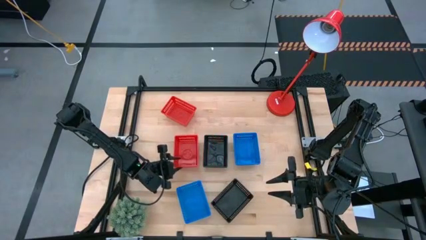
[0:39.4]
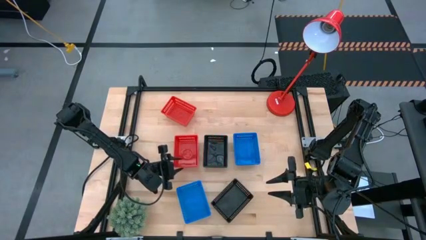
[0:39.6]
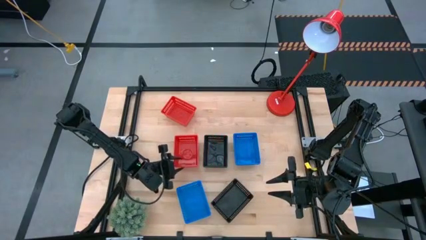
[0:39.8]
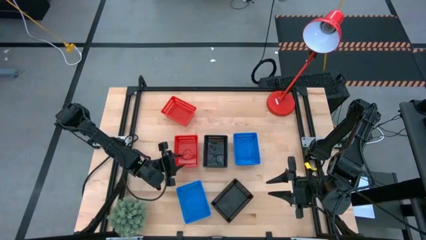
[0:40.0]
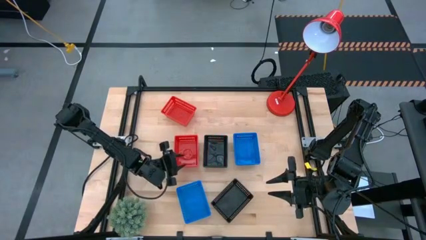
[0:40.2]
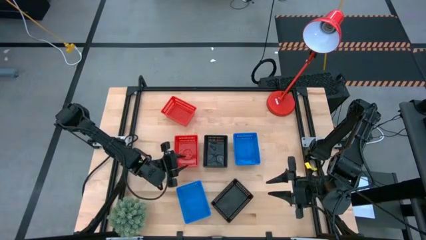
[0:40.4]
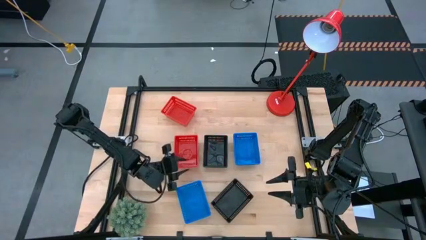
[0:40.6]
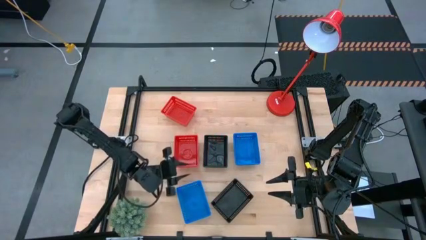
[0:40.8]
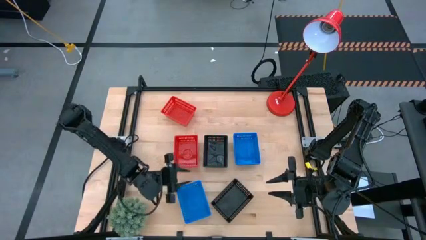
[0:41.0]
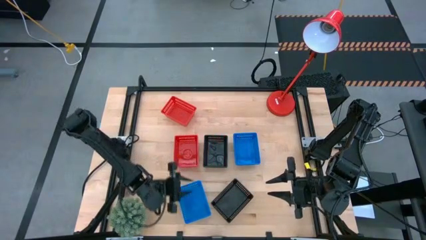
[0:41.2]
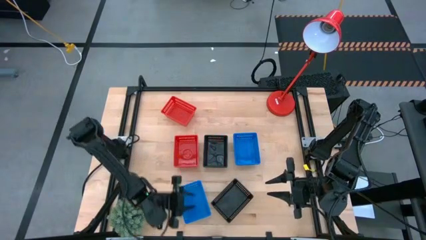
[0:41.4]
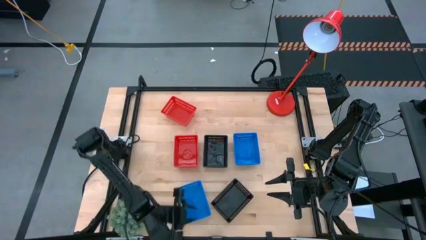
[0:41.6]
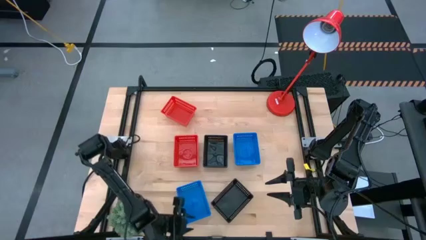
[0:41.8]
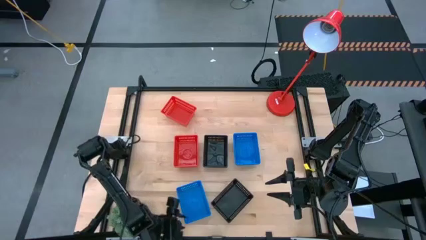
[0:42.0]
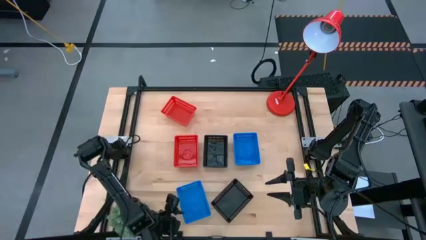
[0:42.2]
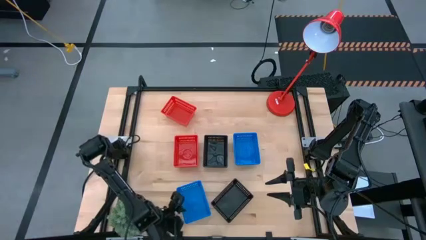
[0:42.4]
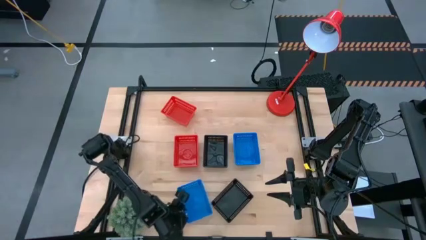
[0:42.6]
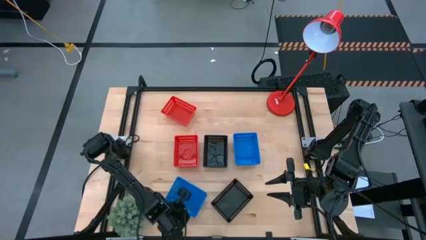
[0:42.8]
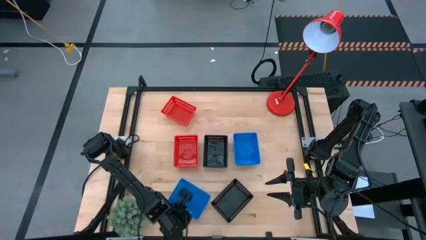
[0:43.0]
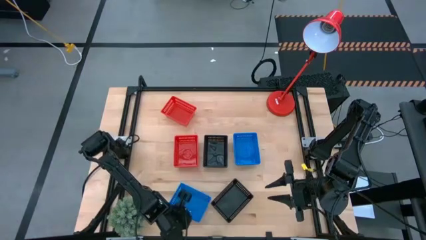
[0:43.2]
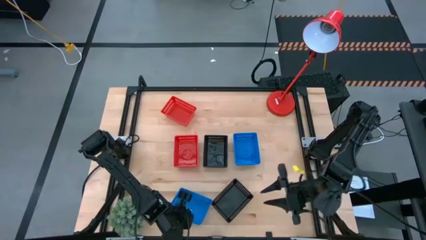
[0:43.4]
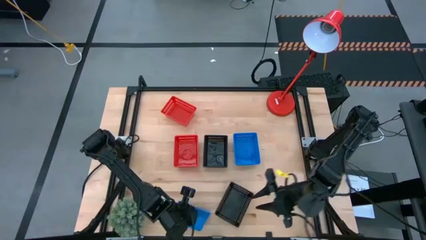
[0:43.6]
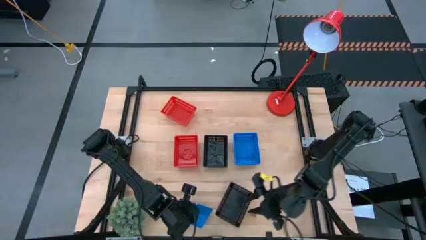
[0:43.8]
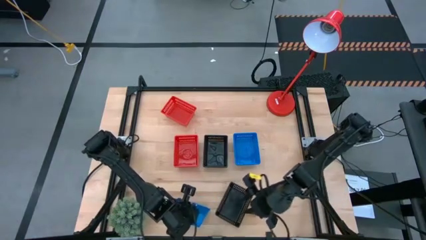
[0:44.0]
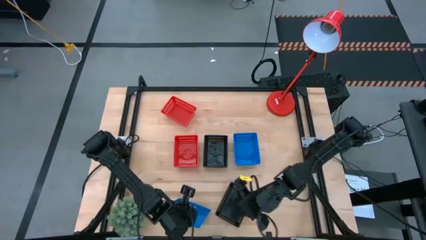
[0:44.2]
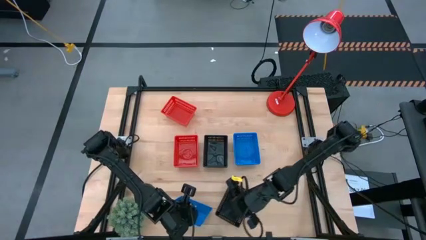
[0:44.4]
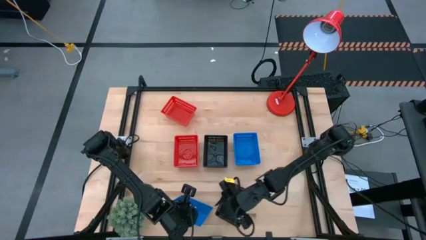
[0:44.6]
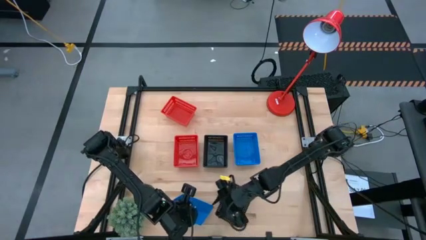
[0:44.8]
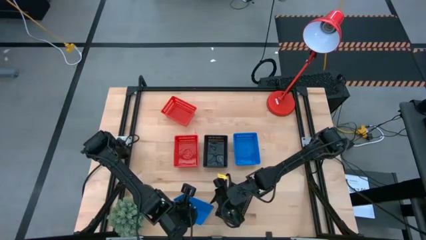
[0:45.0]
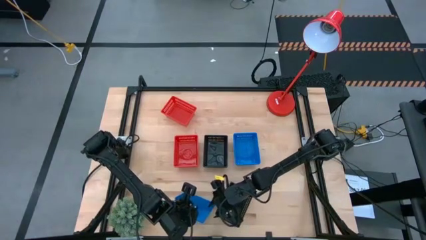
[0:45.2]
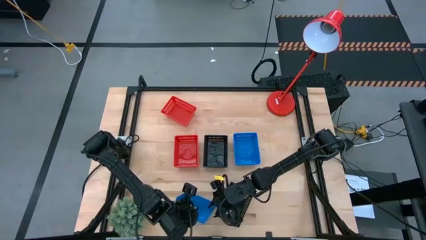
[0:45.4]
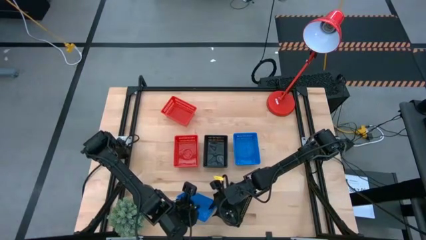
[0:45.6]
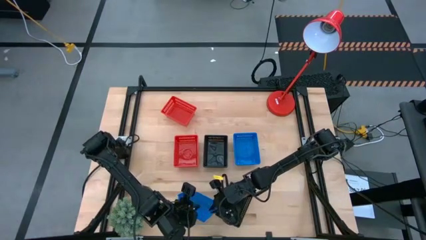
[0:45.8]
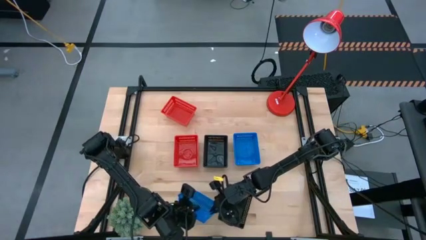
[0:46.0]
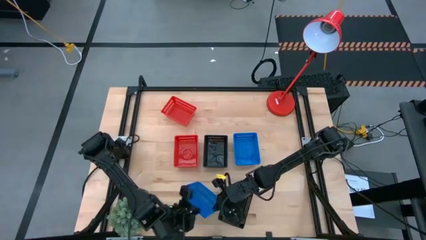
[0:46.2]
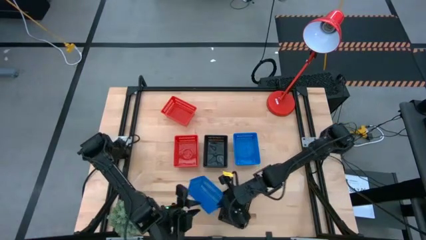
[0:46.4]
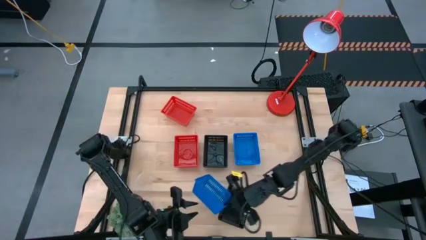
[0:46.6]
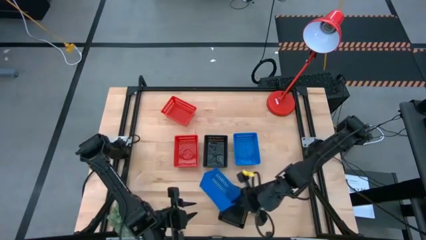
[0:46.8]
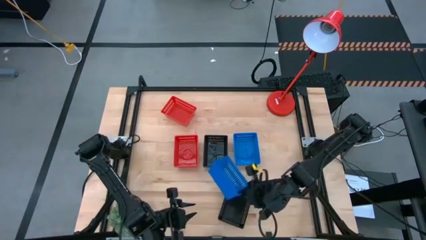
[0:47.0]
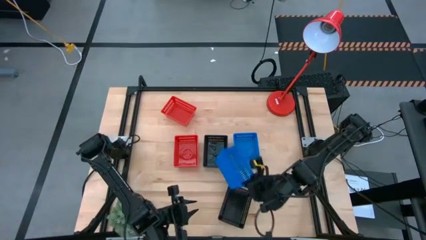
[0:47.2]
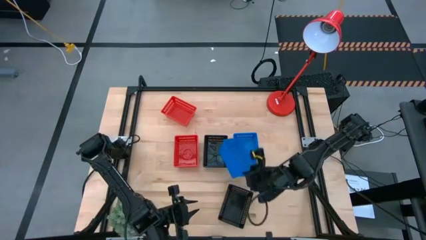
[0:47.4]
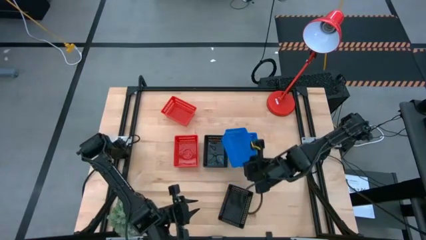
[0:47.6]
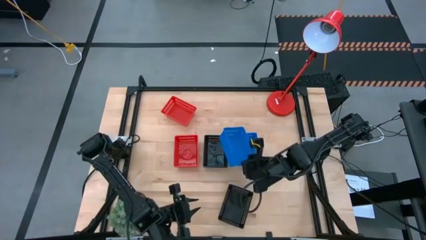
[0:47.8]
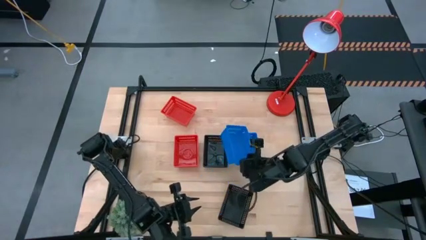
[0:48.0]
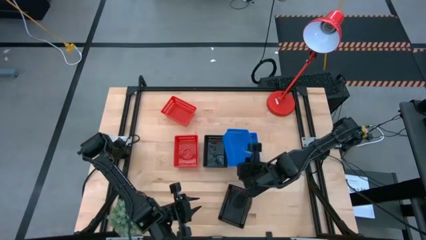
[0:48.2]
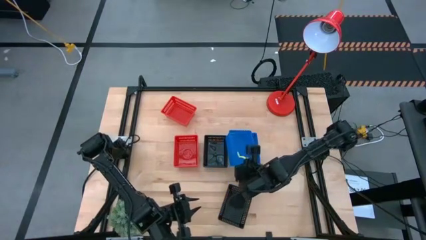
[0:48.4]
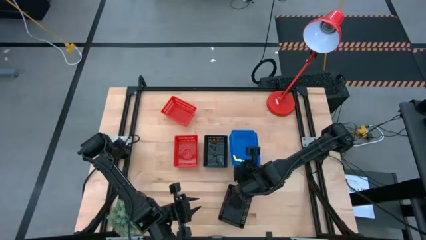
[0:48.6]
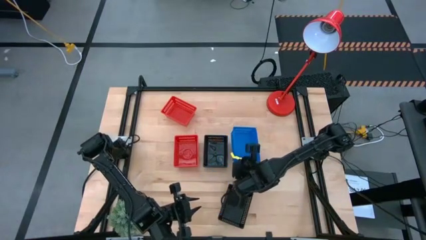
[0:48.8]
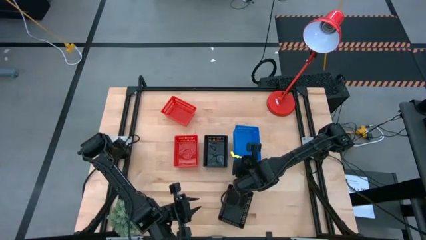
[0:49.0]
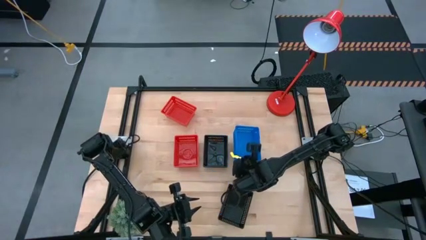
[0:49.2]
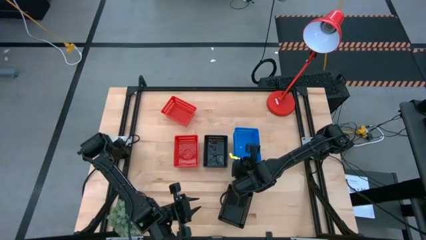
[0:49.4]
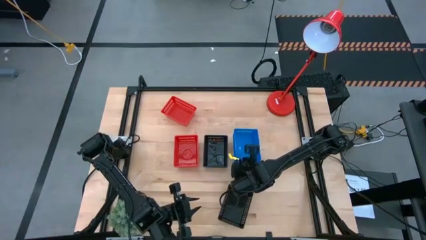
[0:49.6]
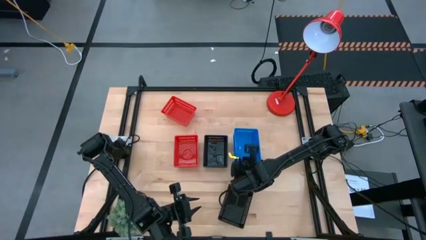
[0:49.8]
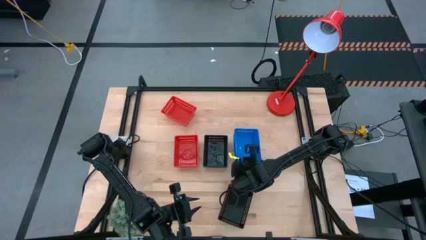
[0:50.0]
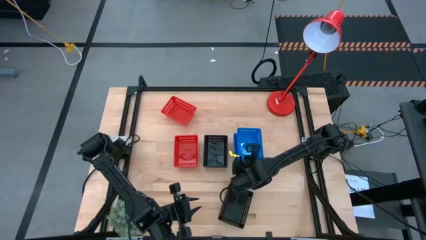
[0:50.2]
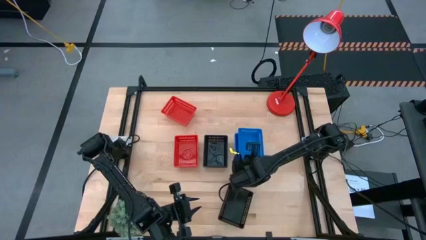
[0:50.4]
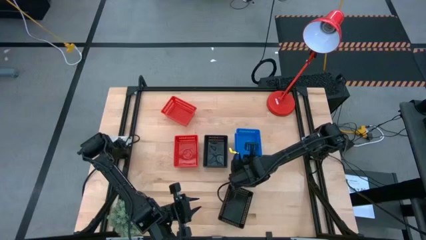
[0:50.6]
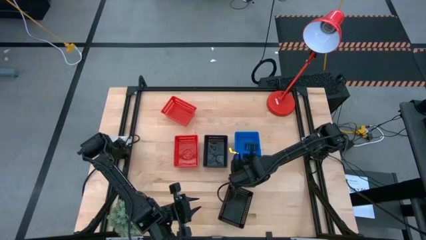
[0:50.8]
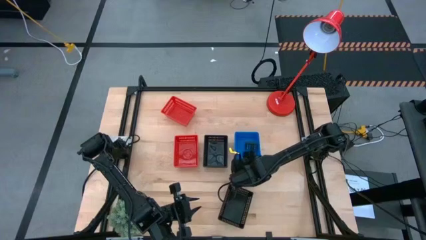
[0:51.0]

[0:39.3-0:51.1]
Stack the bottom blue bin on the top stacked blue bins

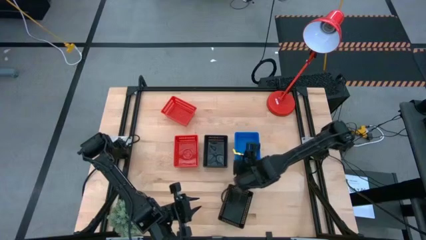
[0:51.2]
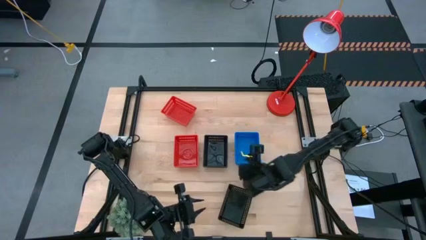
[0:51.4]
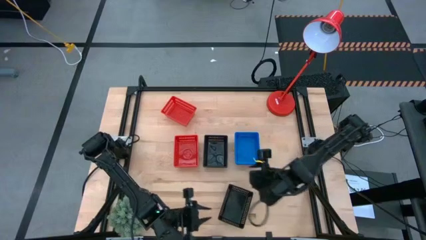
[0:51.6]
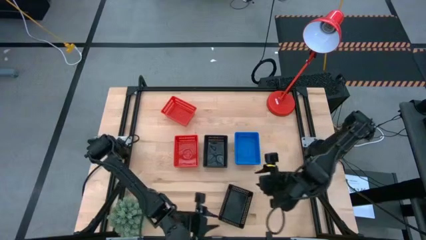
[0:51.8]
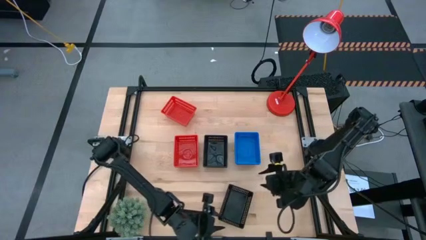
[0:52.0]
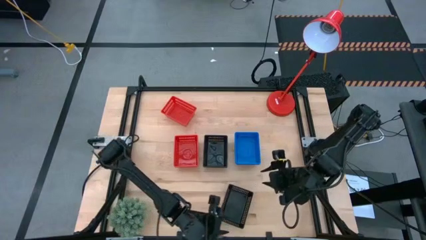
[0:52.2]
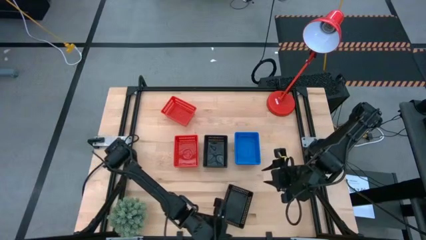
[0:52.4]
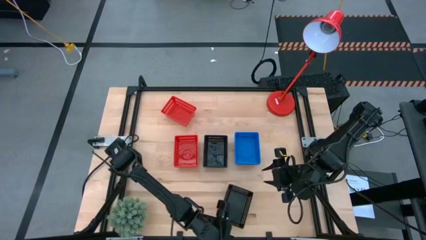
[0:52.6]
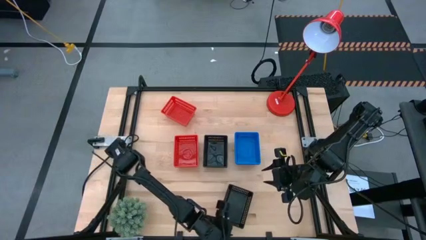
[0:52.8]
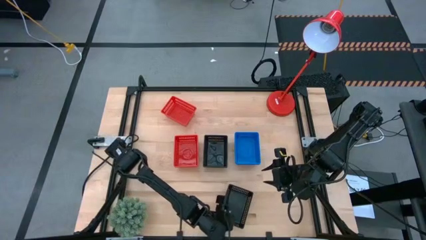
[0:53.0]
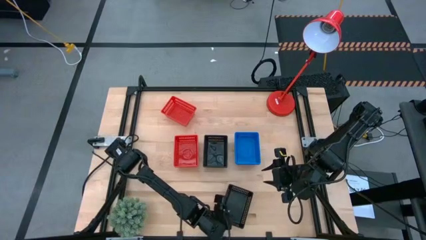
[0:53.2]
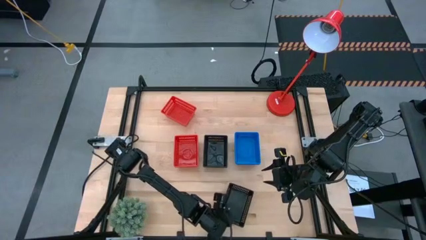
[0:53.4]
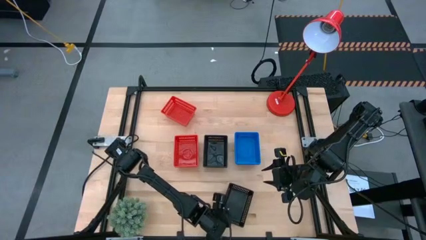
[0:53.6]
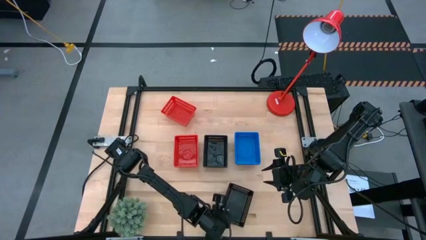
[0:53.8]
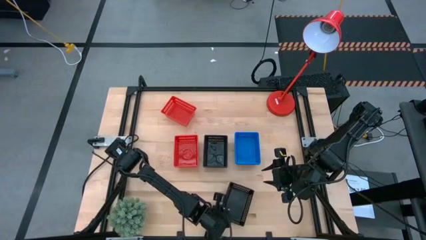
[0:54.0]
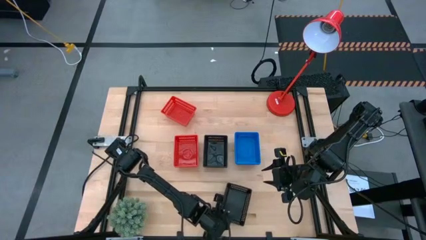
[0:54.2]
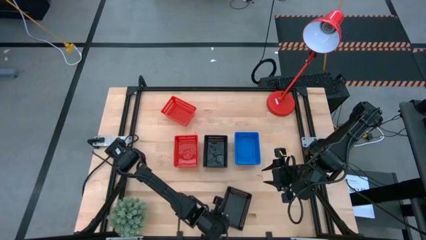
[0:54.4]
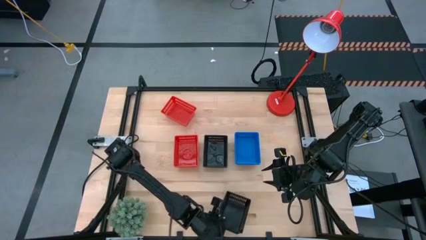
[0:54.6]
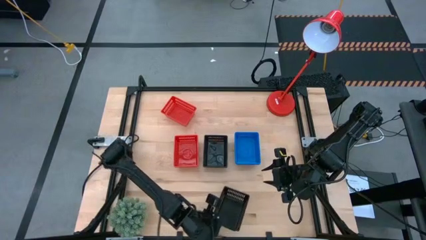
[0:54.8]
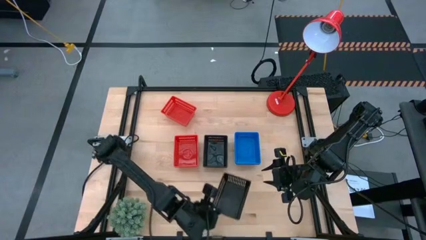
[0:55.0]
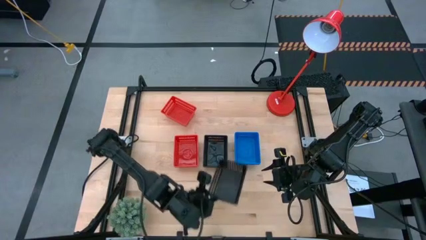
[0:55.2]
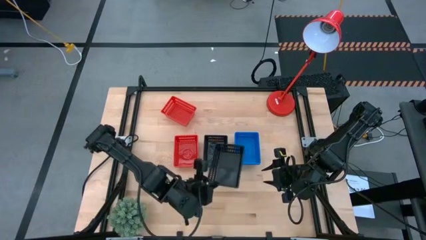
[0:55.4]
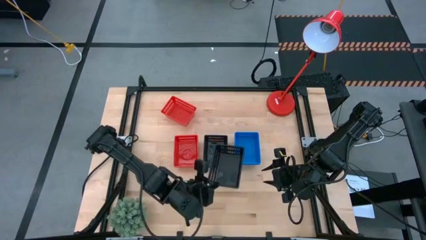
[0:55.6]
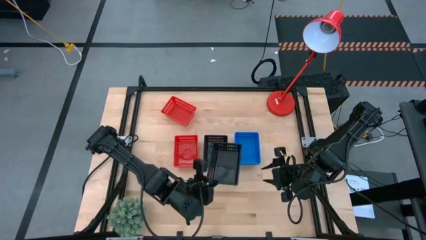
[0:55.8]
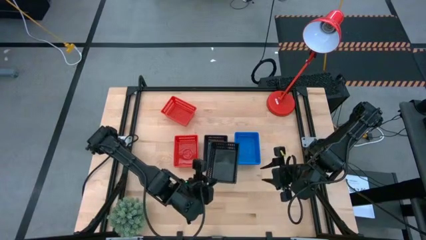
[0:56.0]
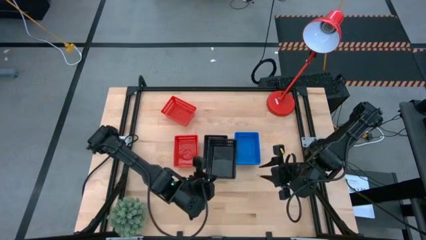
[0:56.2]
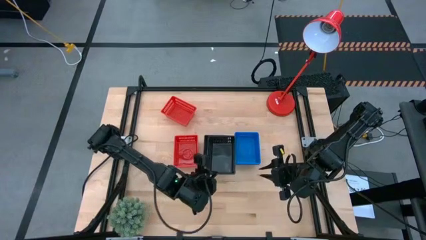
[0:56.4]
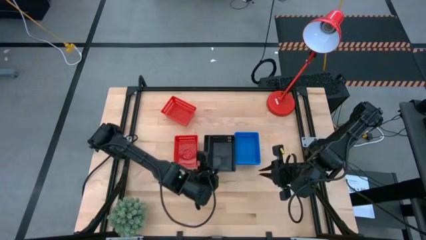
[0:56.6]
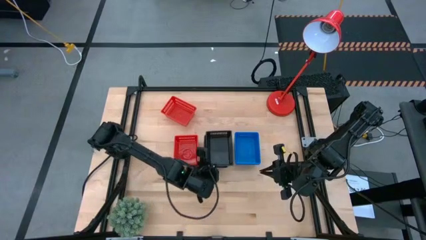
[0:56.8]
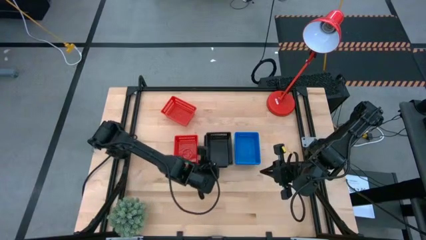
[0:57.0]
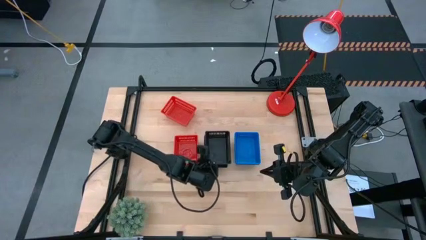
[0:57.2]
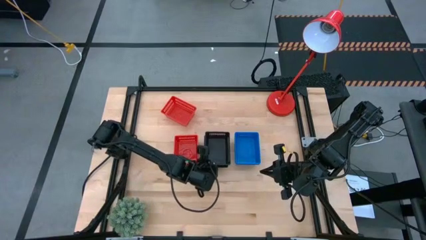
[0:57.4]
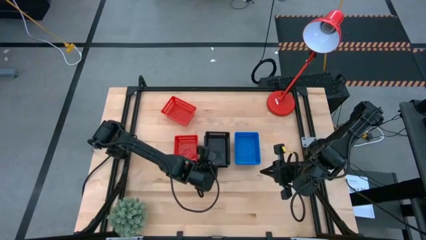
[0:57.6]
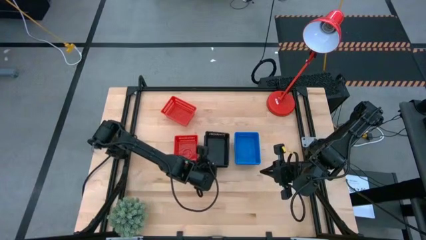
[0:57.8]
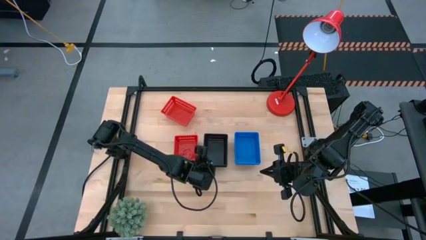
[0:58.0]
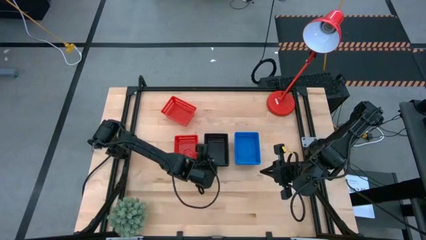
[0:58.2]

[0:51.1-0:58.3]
Stack the bottom black bin on the top stacked black bins
